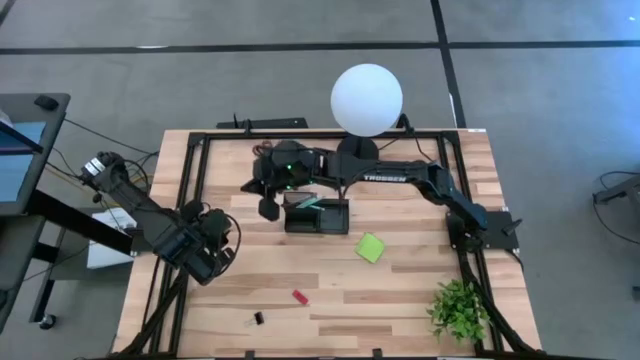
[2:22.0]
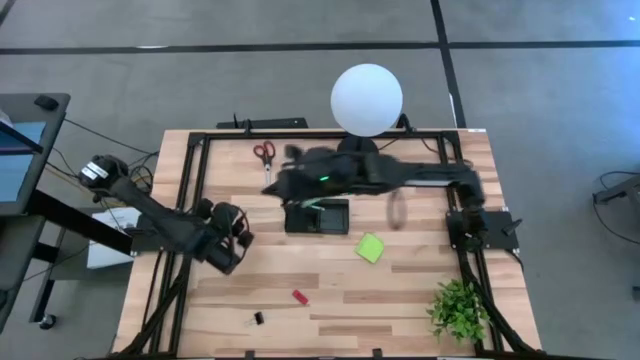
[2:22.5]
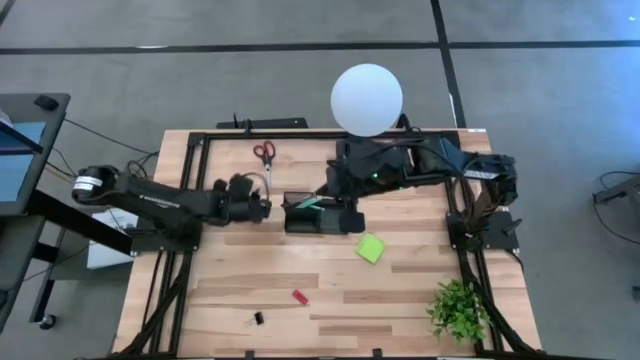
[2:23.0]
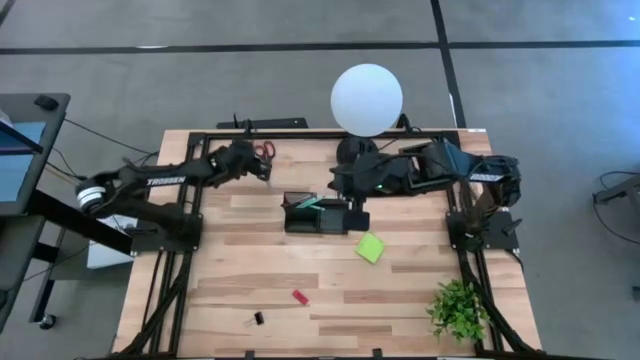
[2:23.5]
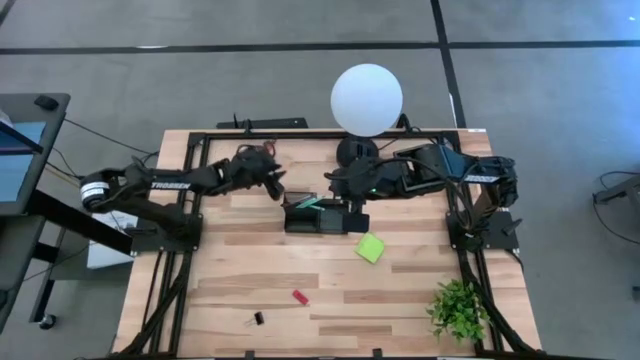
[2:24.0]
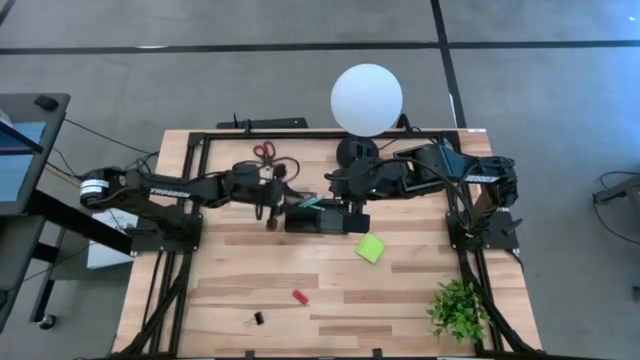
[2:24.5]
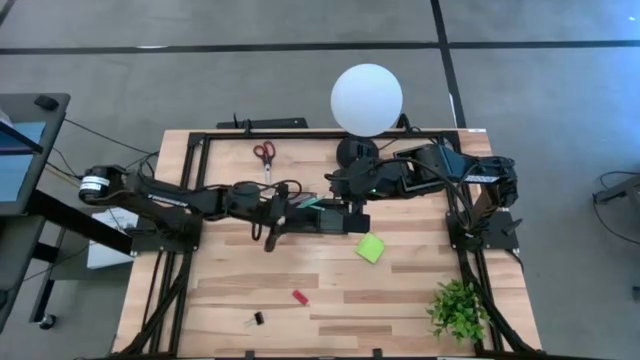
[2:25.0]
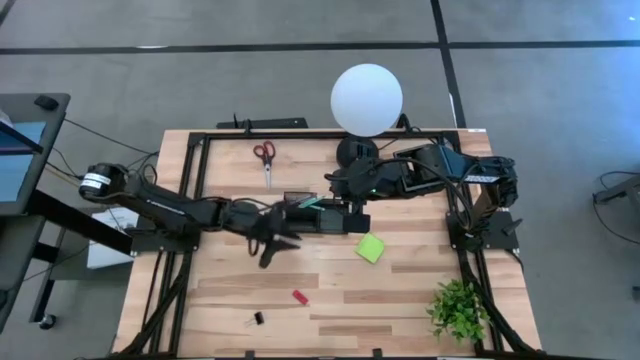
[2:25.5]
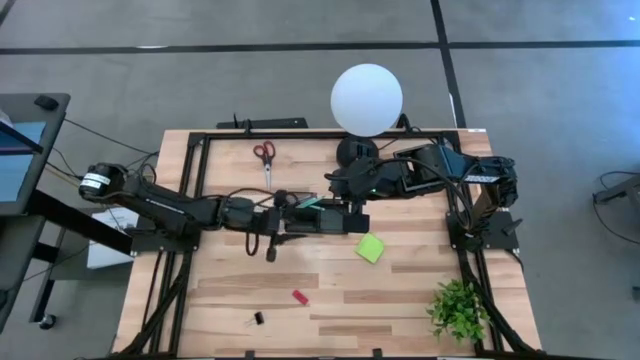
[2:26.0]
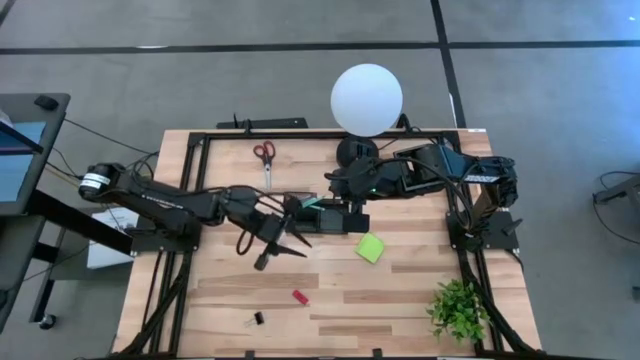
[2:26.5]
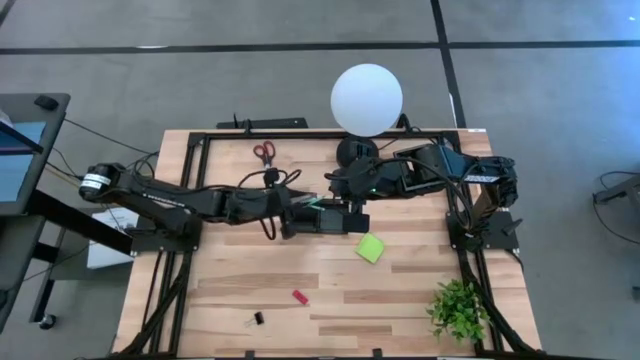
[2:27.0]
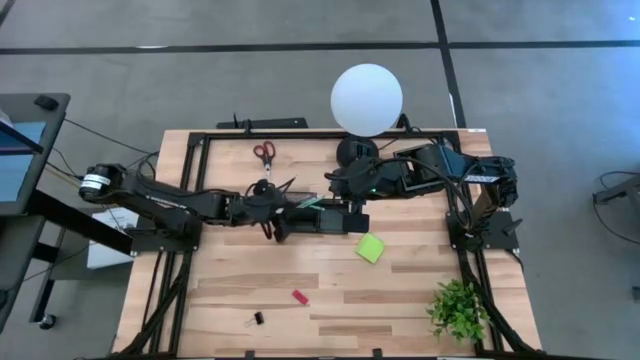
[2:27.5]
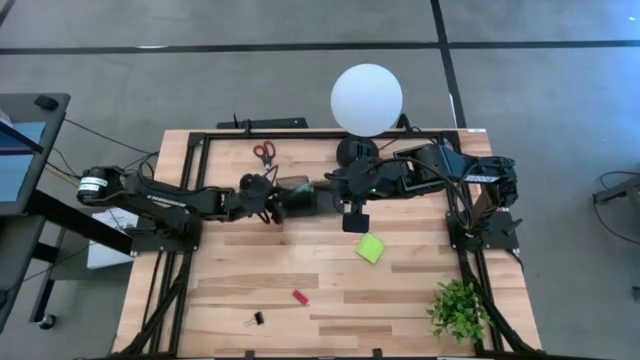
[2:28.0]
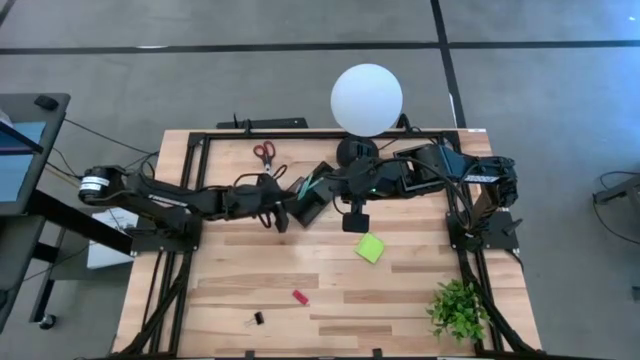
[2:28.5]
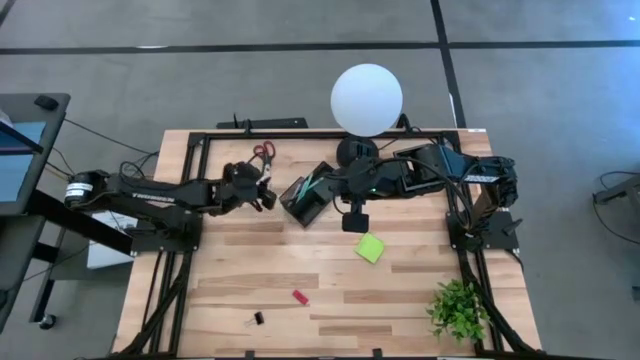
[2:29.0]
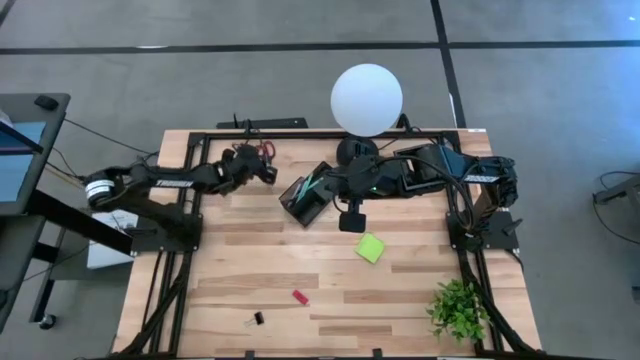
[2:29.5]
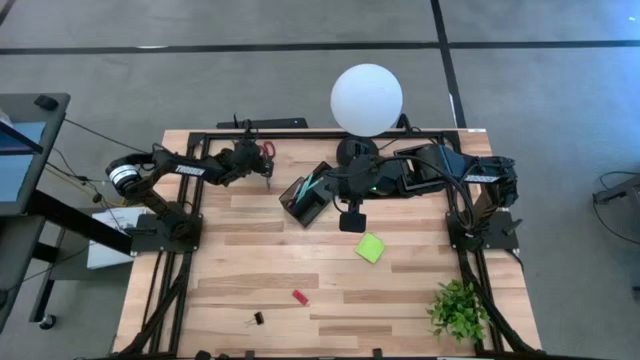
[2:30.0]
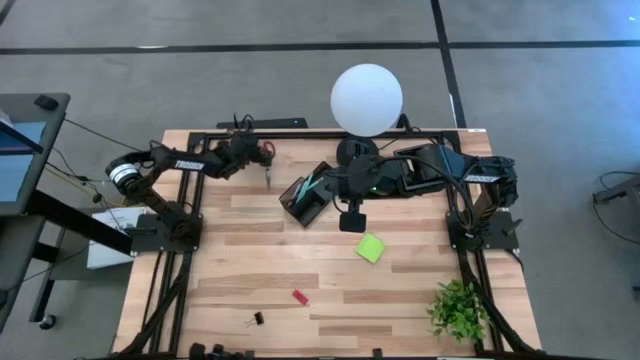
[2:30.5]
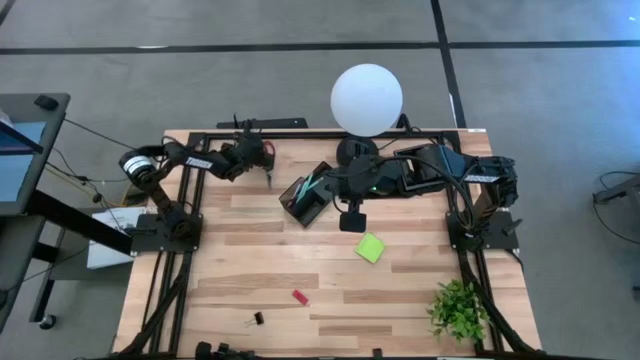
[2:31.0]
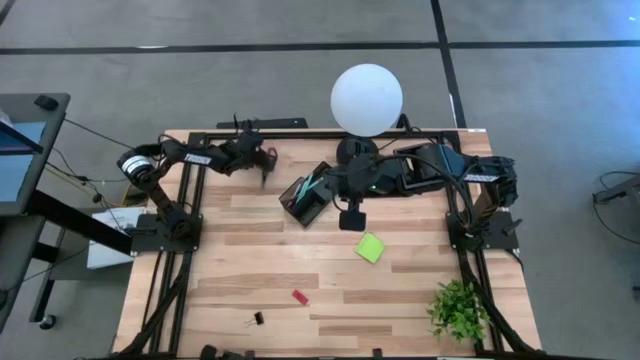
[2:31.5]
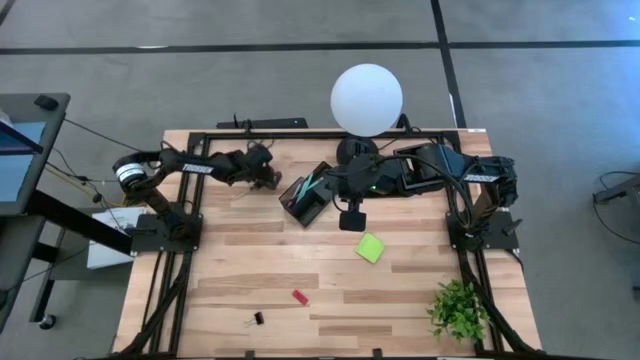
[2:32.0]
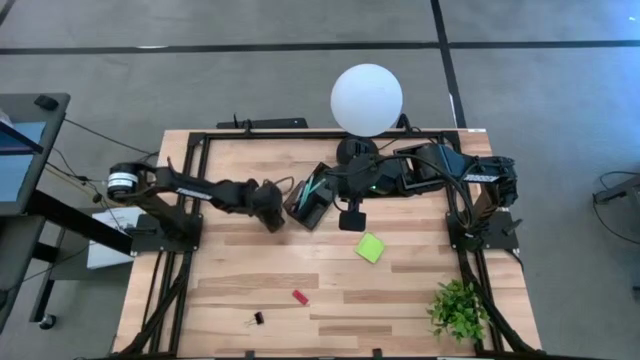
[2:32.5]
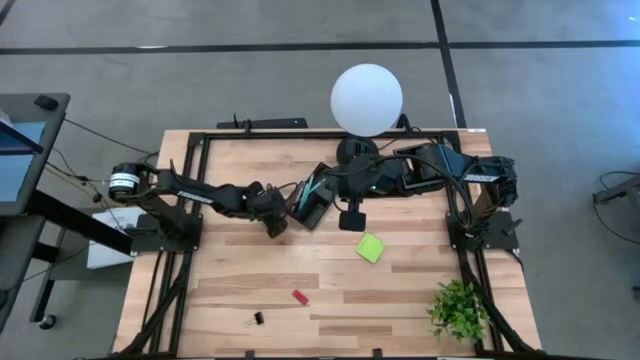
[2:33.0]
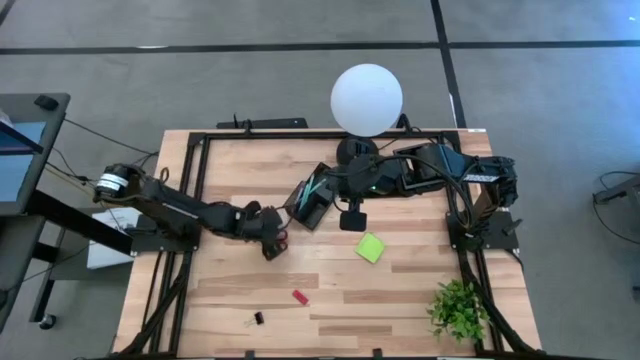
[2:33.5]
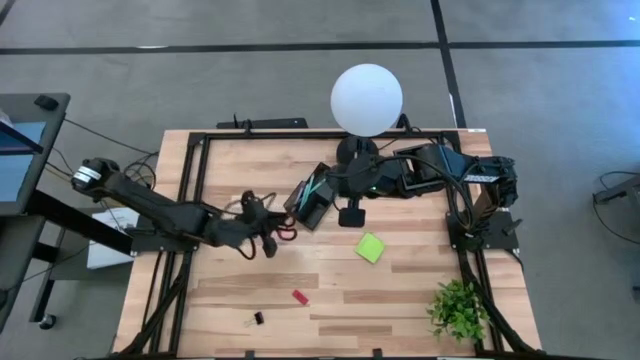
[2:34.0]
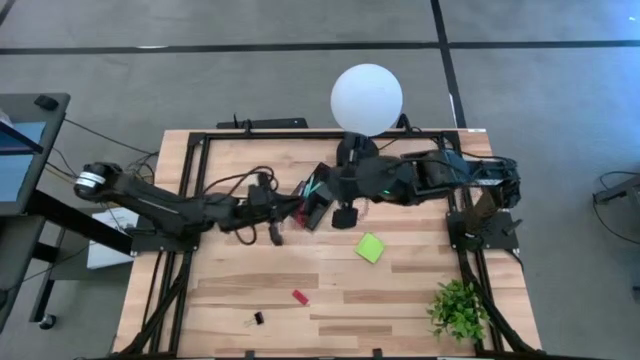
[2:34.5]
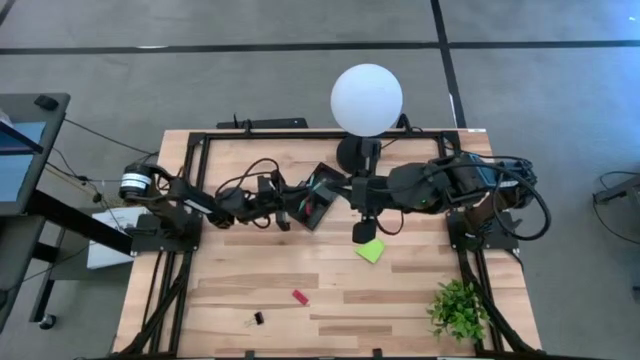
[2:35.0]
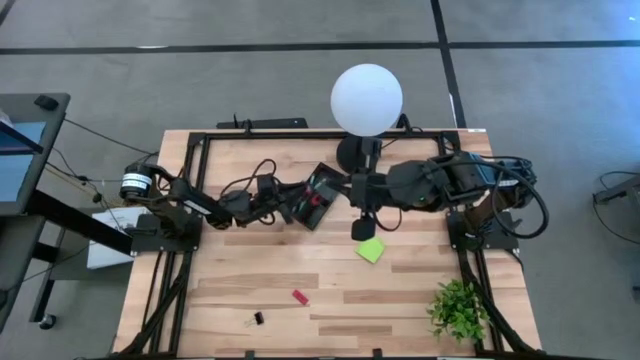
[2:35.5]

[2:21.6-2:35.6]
Task: Pick and place office supplies into organizer
Put the black scissors into the black desk organizer

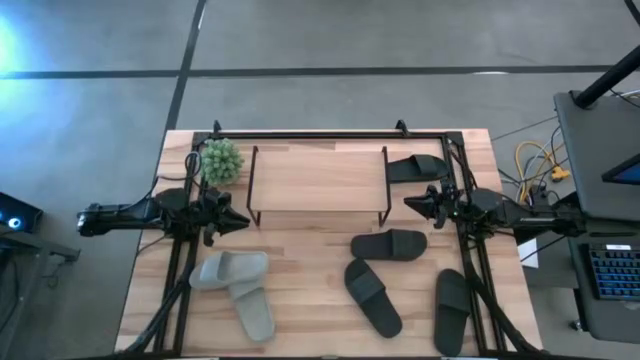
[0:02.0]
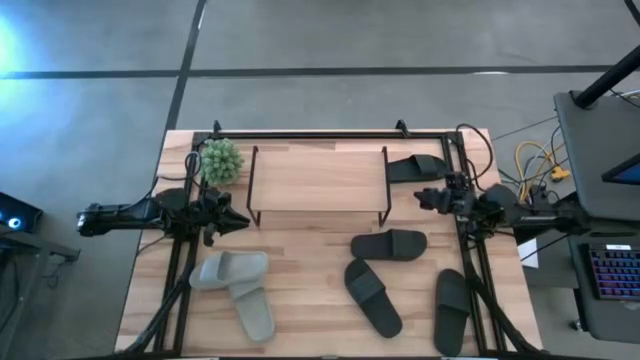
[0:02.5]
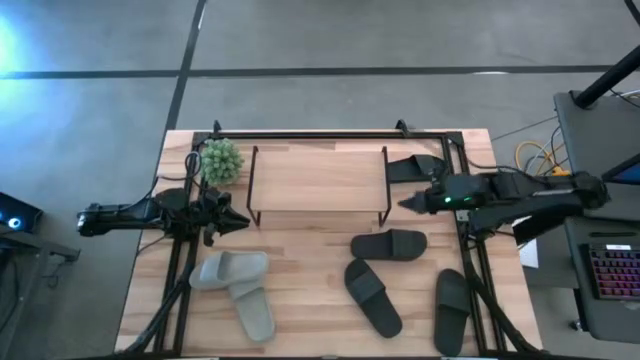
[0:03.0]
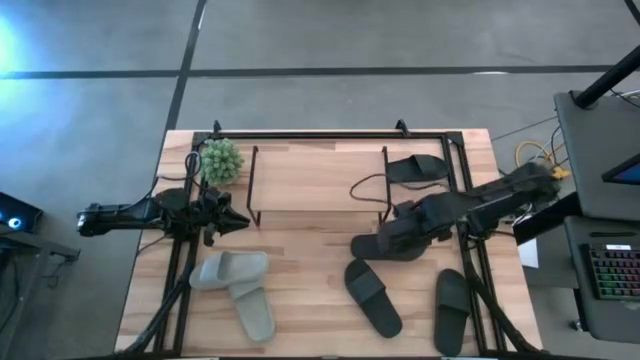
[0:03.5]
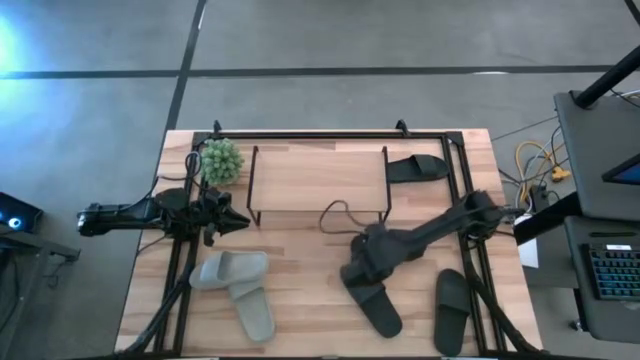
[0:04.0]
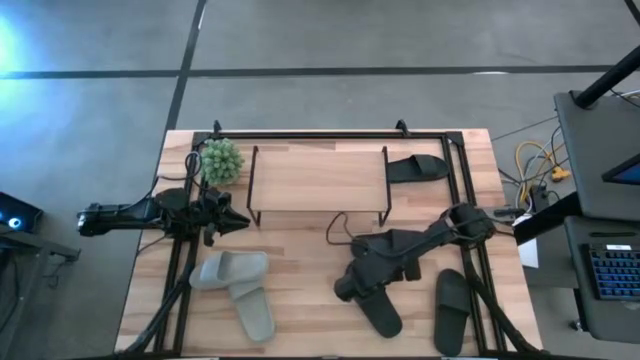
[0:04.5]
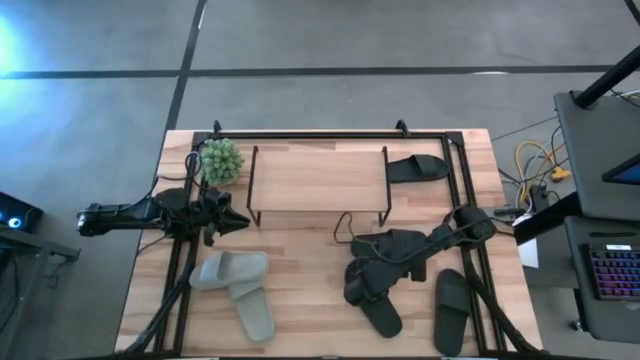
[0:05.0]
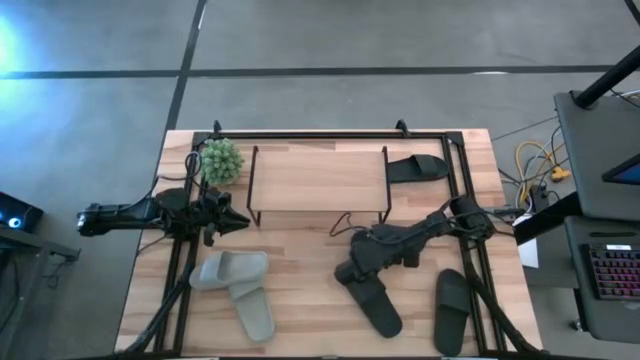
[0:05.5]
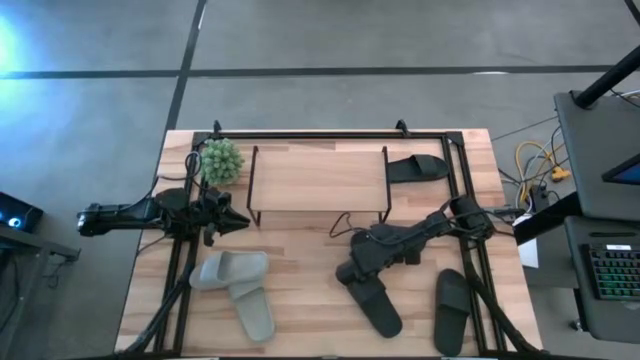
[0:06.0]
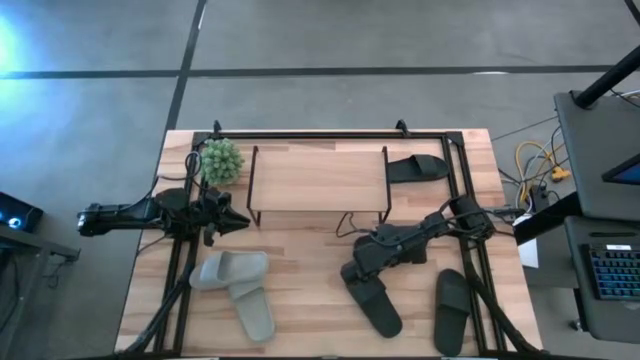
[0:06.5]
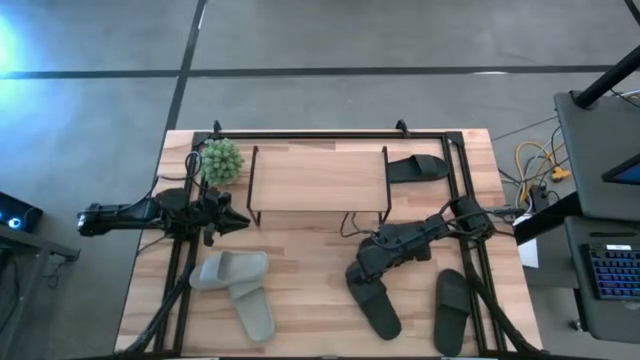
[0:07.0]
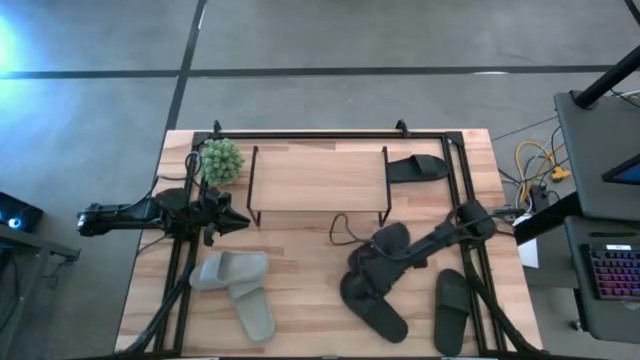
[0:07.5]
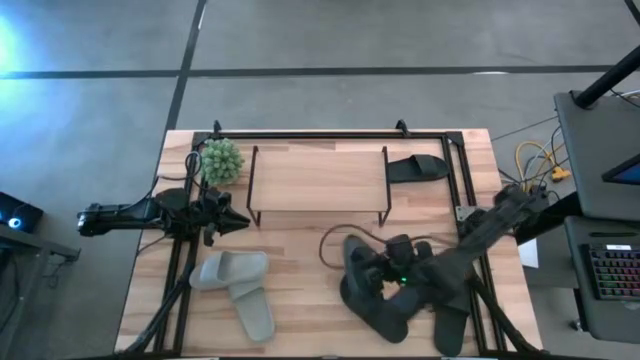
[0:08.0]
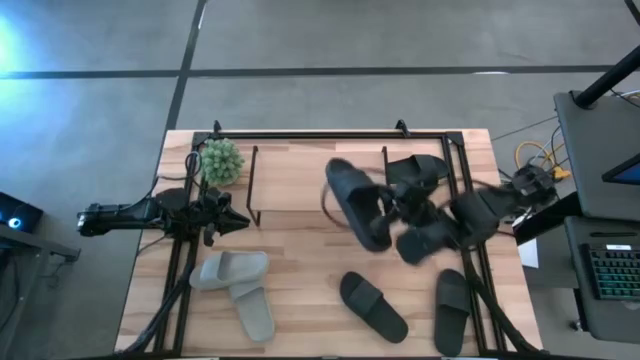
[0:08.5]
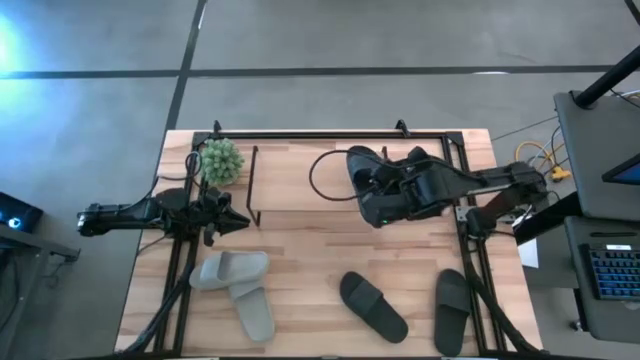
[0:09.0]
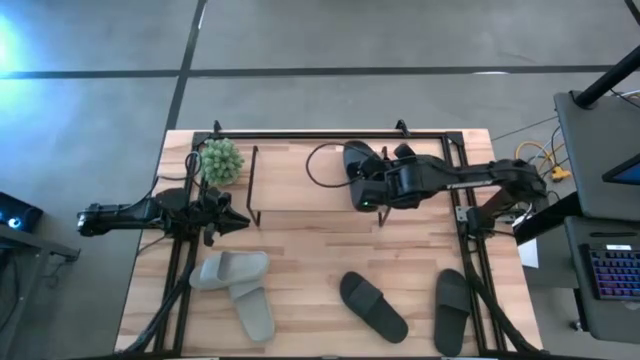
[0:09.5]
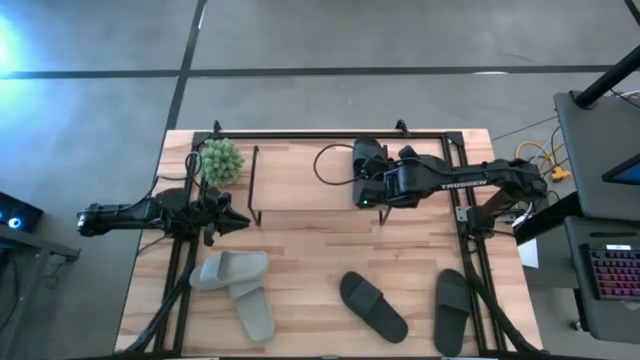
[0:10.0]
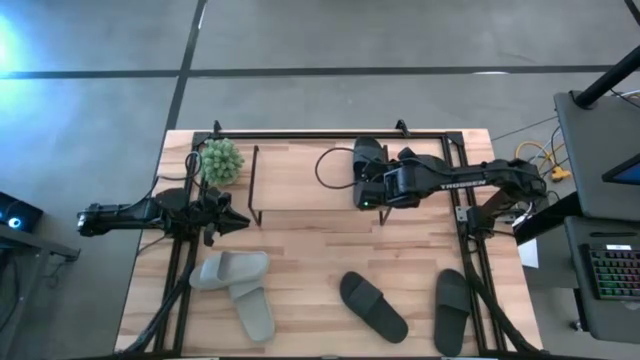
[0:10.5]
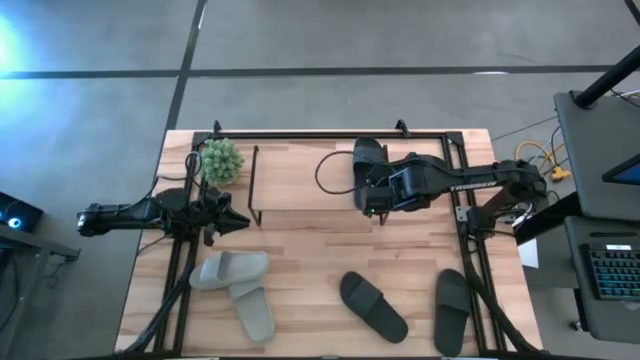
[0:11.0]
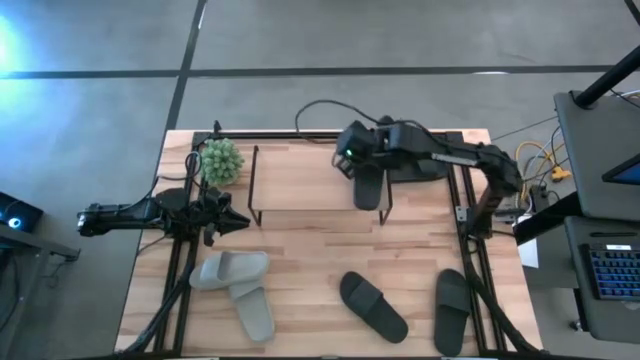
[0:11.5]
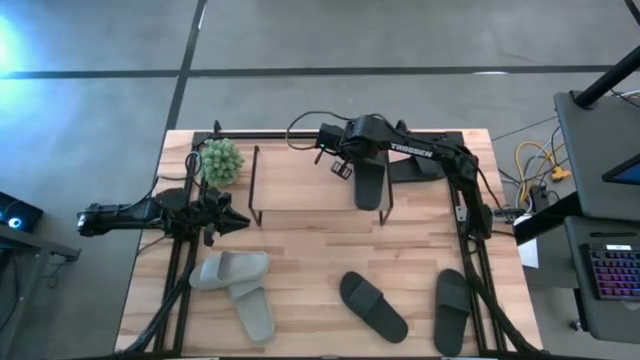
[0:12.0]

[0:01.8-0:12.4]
Task: Pick and place slides into the shelf
Put the black slipper on the shelf
